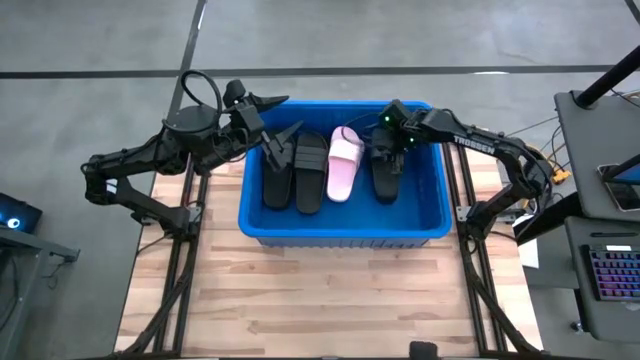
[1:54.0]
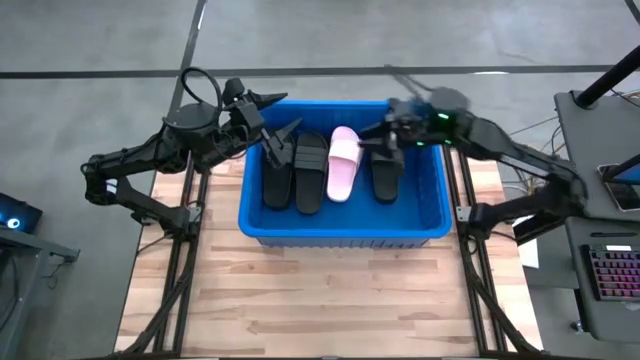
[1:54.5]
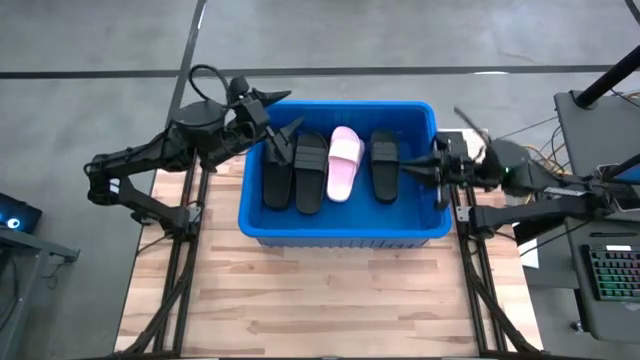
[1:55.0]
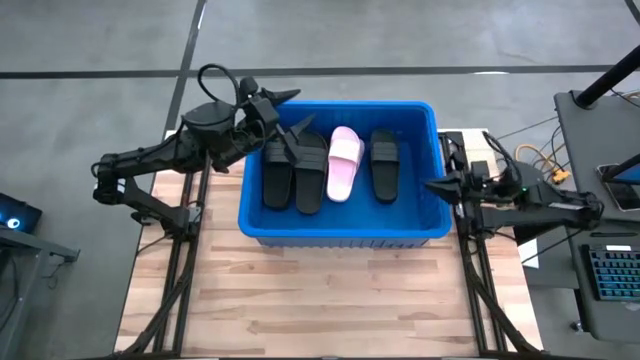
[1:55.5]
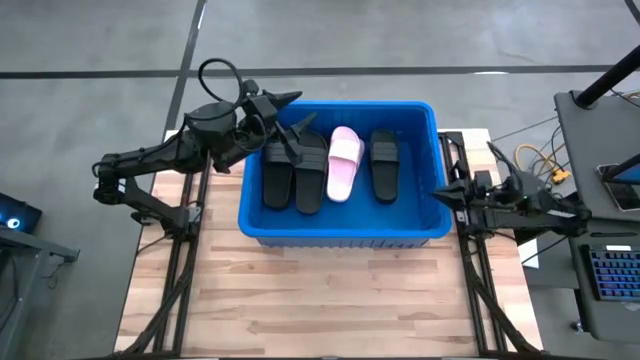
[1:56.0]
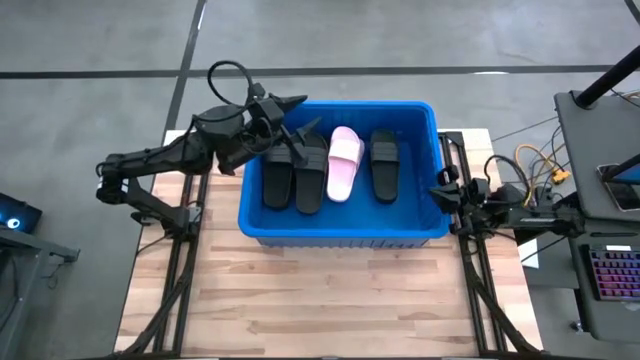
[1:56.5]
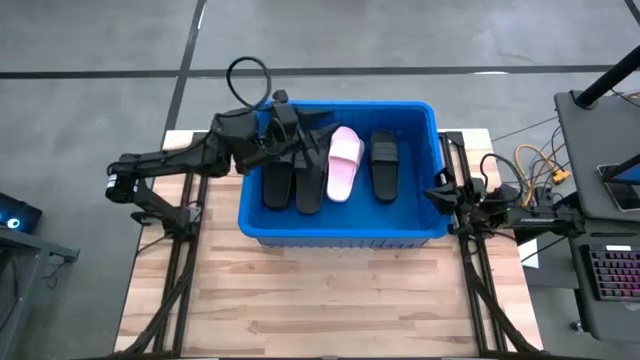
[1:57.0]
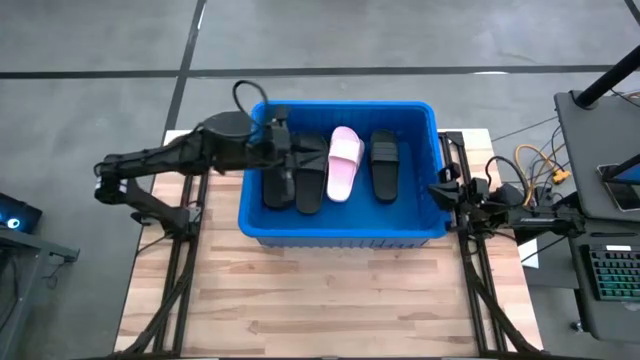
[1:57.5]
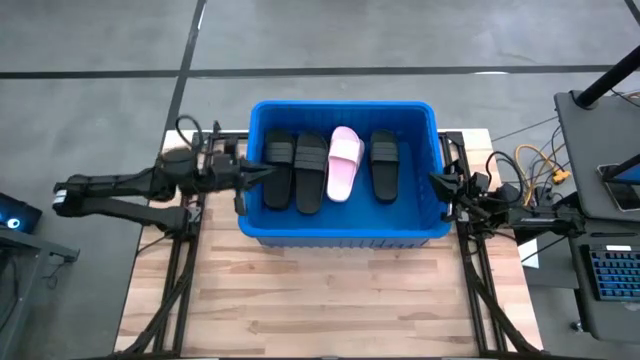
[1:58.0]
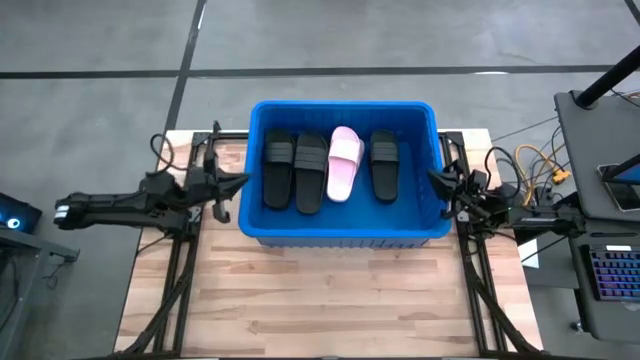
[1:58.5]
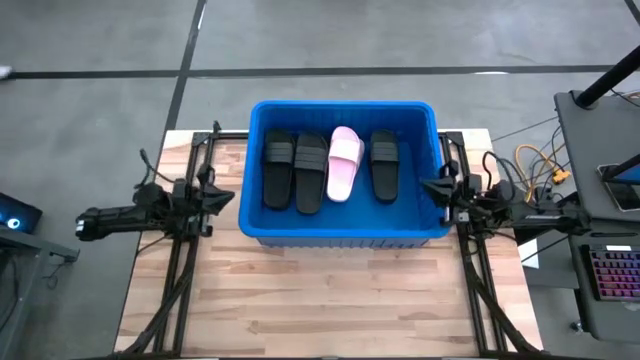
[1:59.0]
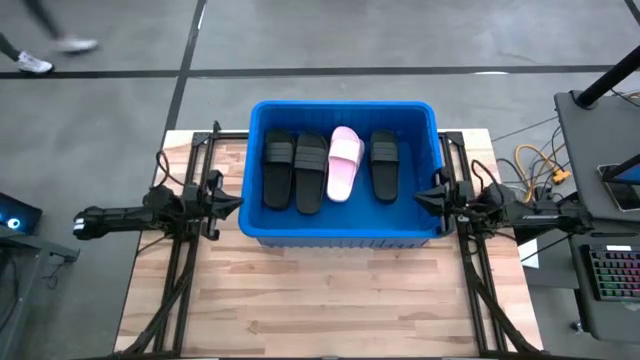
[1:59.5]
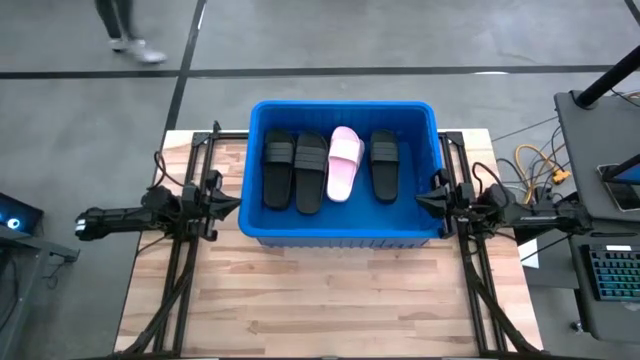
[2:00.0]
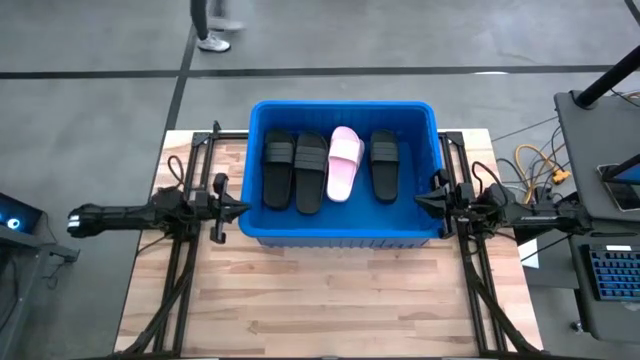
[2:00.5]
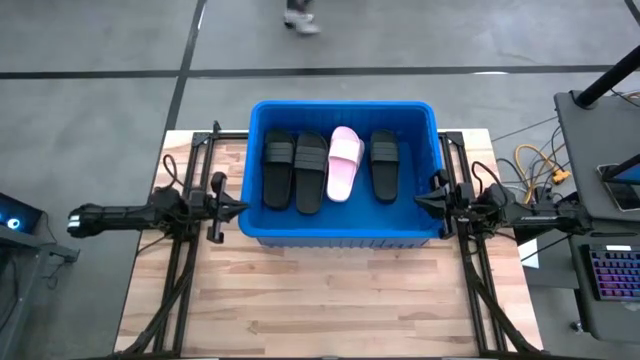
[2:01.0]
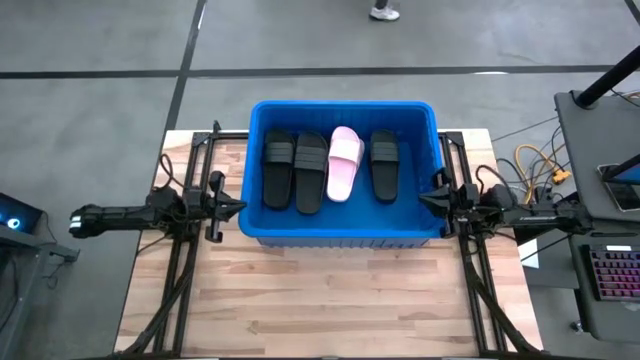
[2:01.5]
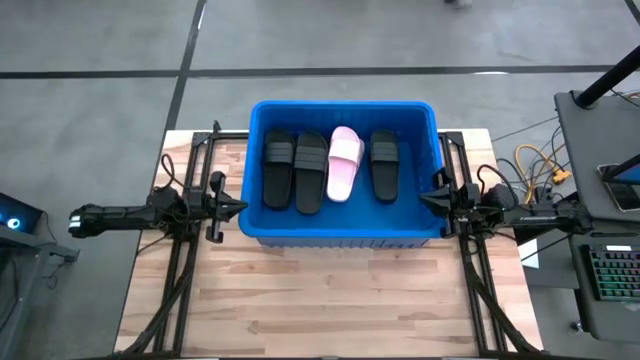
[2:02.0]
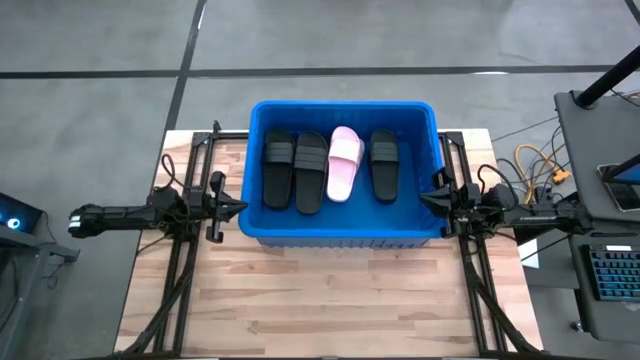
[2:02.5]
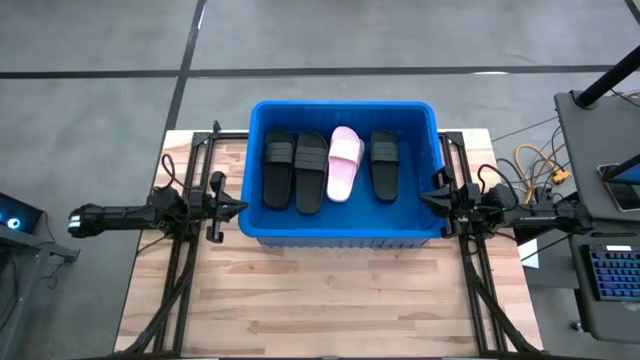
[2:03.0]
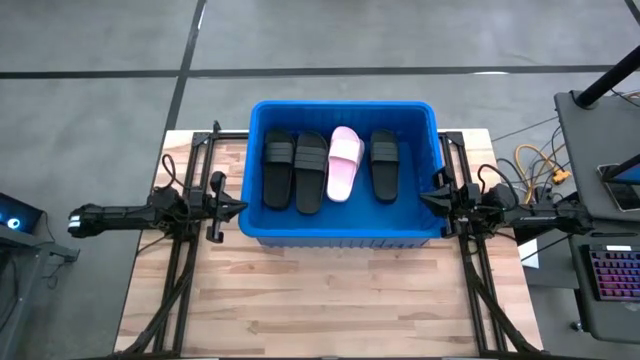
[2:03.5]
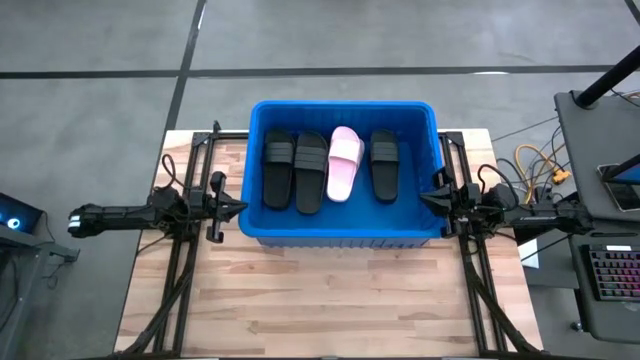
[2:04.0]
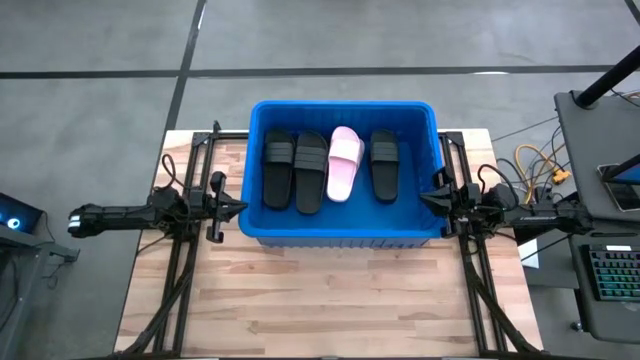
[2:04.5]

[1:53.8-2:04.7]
Task: Pick and place slides into bin
Return to Home Position

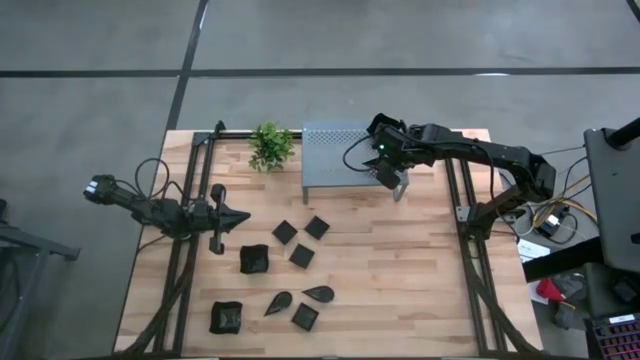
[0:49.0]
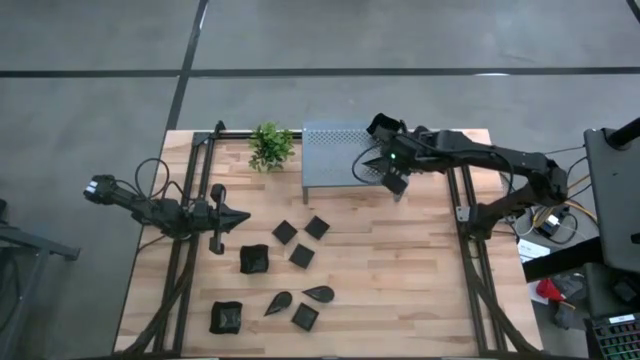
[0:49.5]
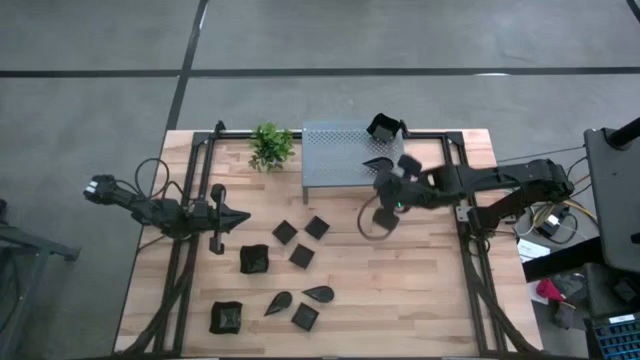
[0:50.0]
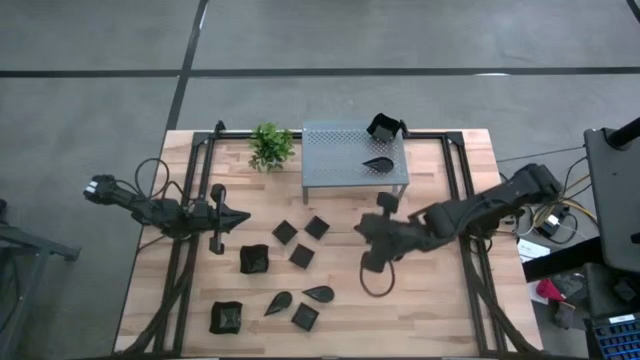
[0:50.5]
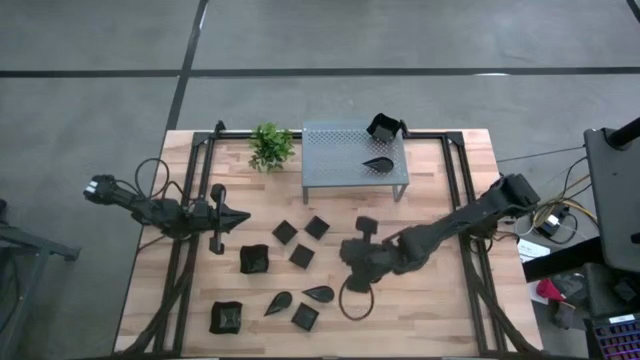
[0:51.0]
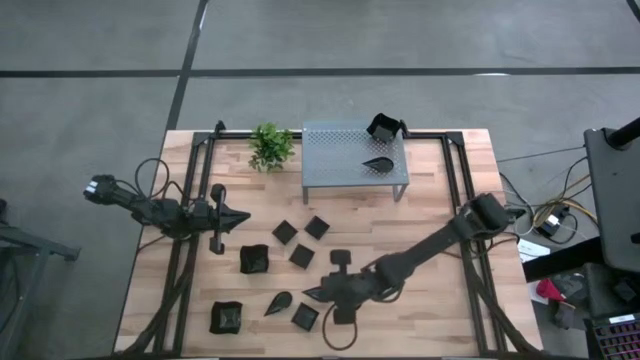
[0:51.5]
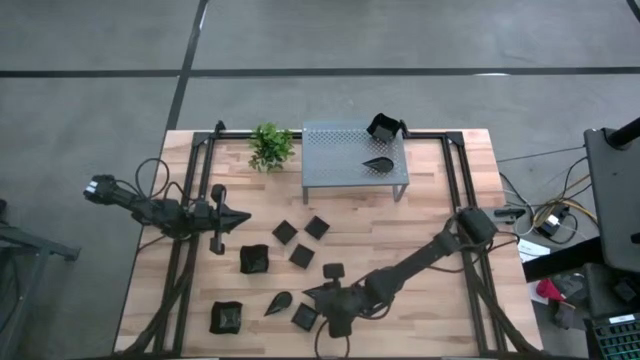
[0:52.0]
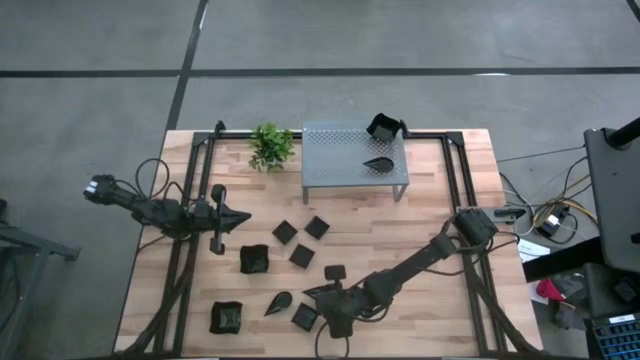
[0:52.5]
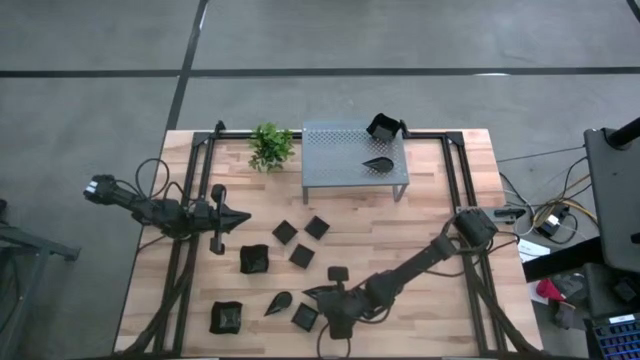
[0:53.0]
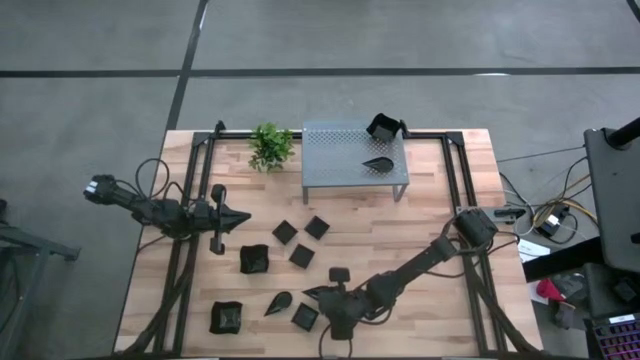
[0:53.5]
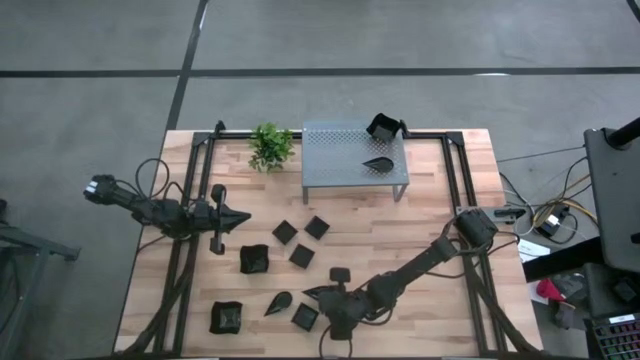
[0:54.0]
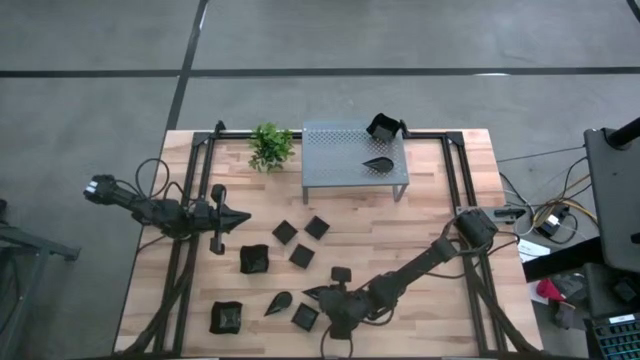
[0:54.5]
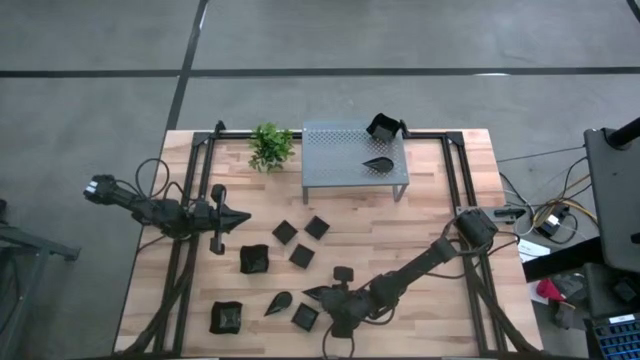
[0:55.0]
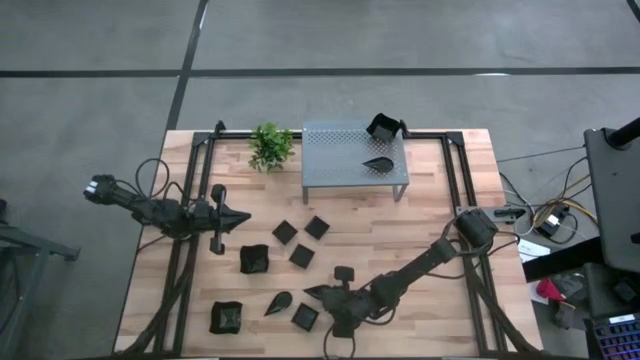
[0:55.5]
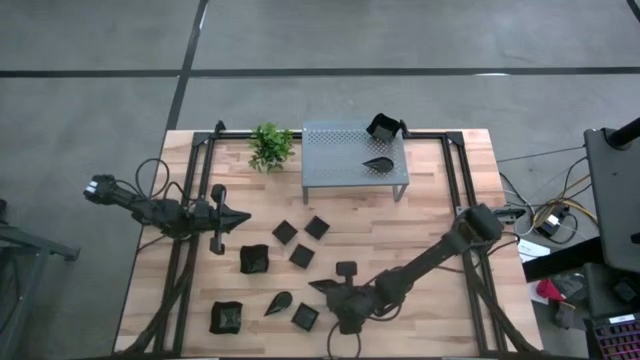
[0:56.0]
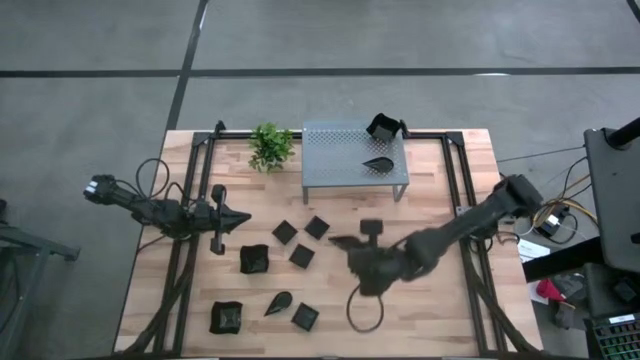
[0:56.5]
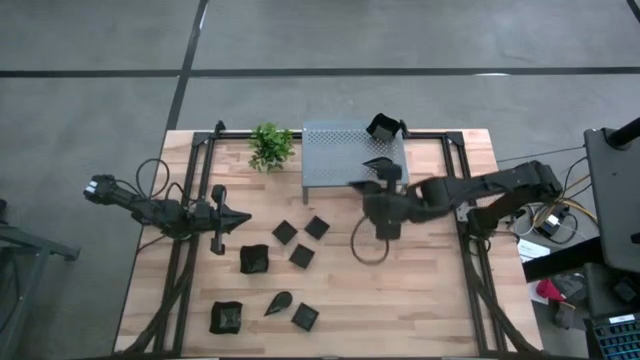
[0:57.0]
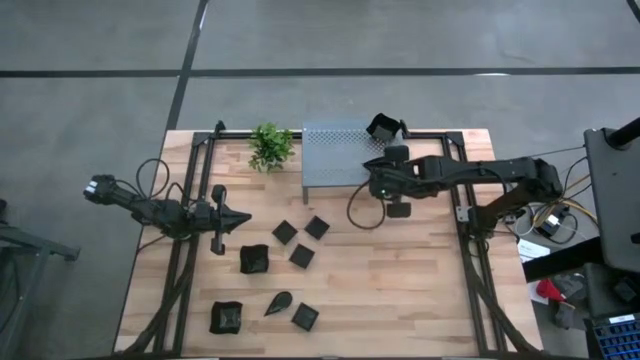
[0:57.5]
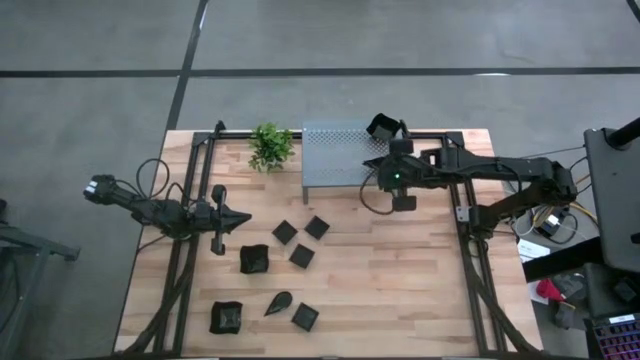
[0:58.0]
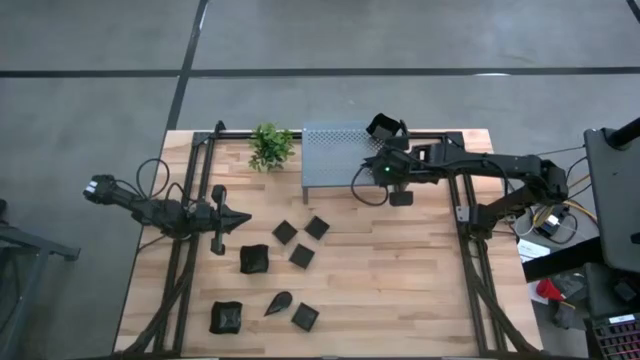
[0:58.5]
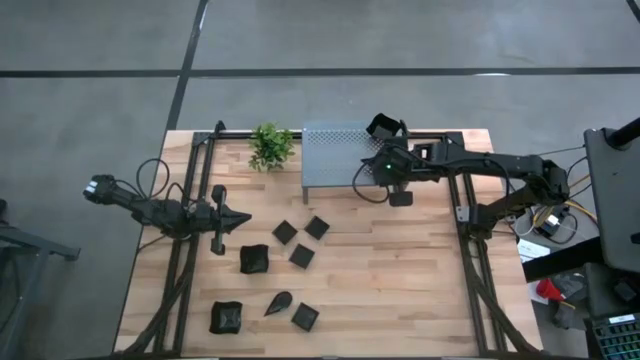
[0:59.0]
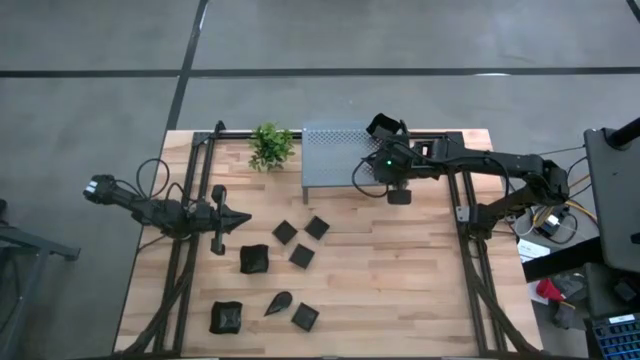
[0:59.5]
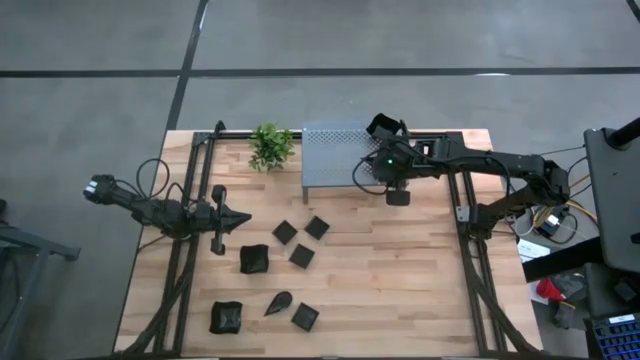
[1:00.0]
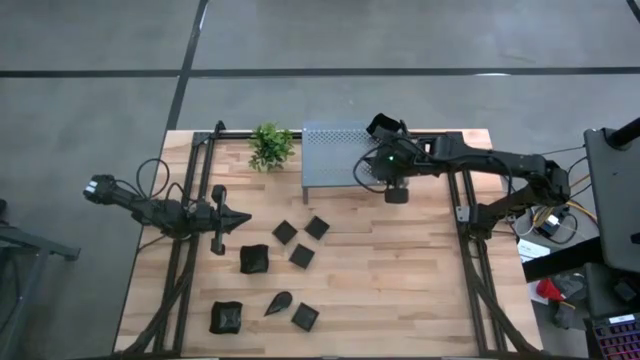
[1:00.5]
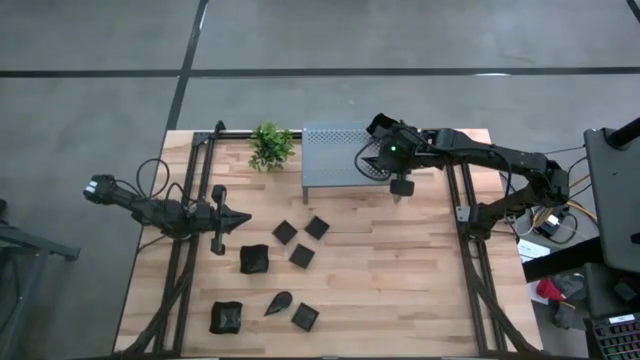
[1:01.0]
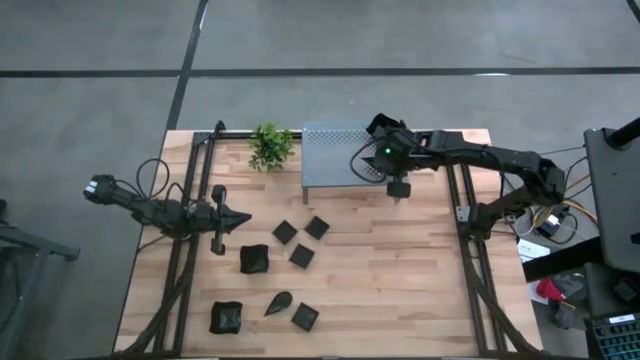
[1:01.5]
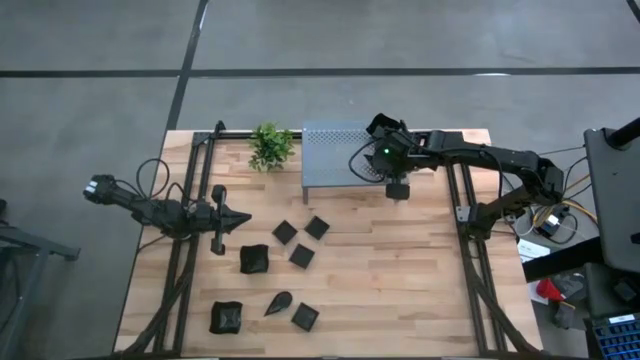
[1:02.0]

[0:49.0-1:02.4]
Task: Pick & Place Mini shaped plates
Stack the drop shaped plate on top of the other drop shaped plate on the shelf
